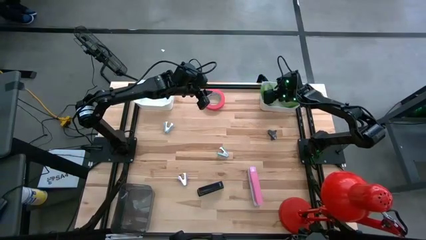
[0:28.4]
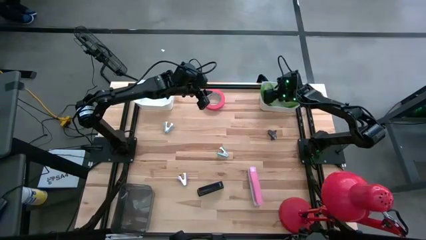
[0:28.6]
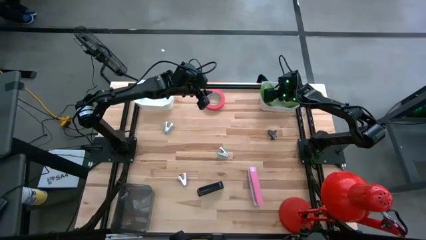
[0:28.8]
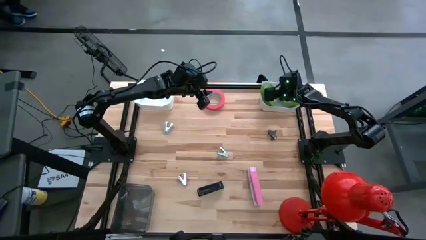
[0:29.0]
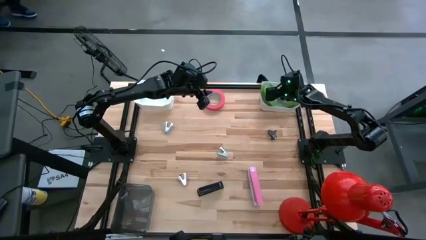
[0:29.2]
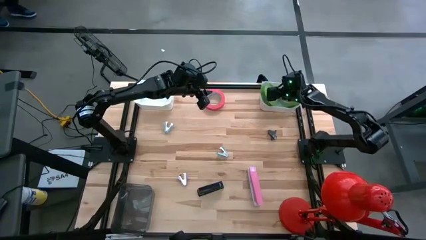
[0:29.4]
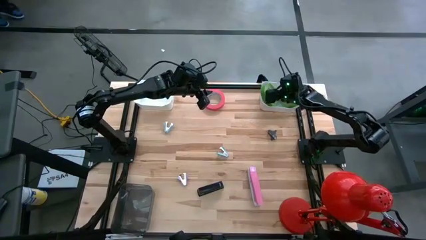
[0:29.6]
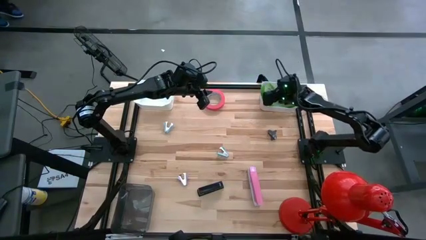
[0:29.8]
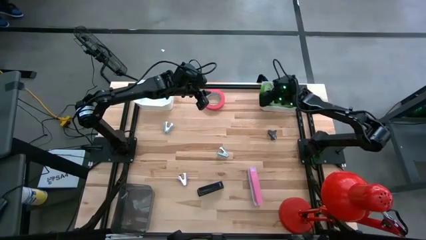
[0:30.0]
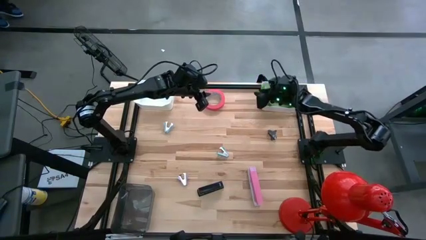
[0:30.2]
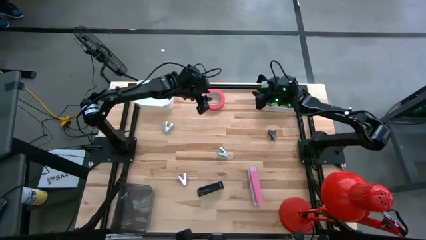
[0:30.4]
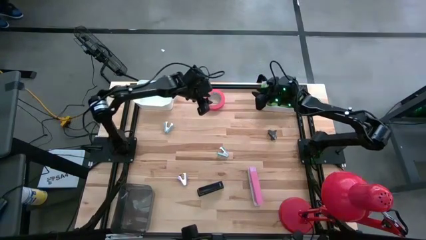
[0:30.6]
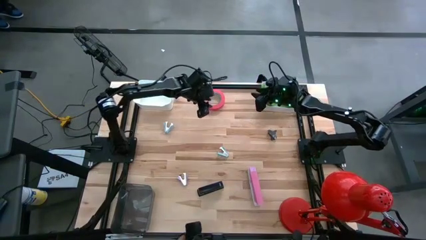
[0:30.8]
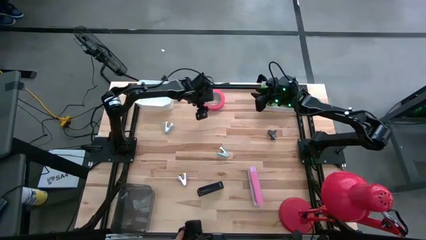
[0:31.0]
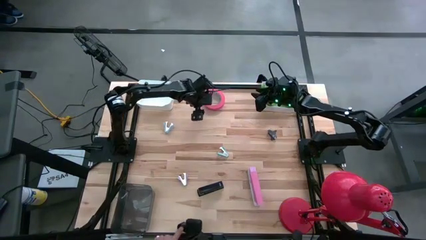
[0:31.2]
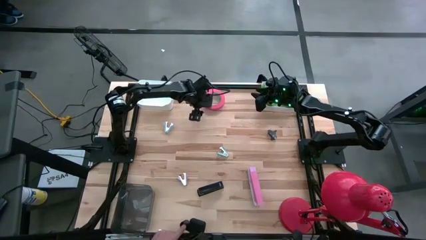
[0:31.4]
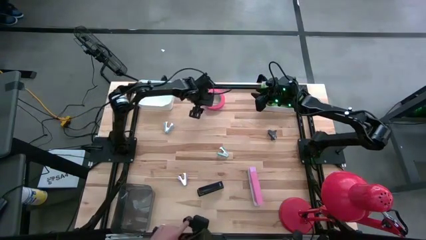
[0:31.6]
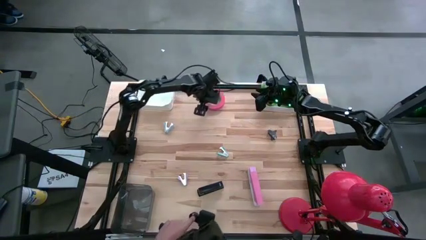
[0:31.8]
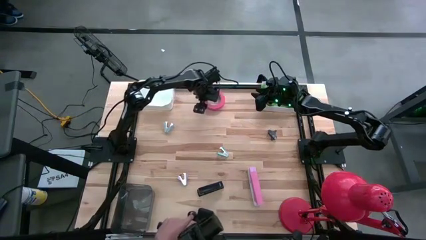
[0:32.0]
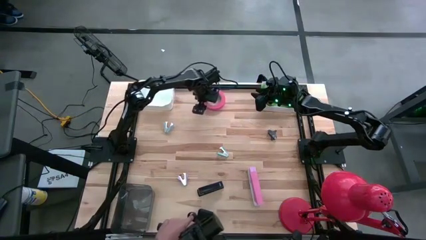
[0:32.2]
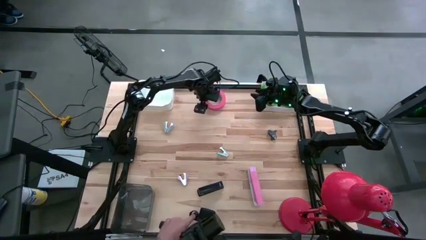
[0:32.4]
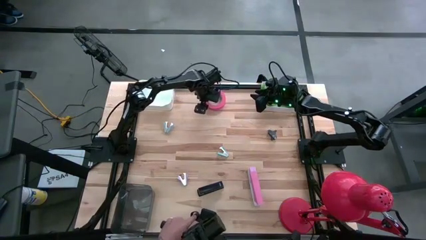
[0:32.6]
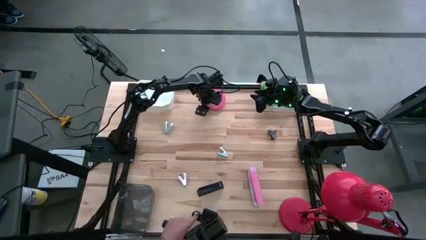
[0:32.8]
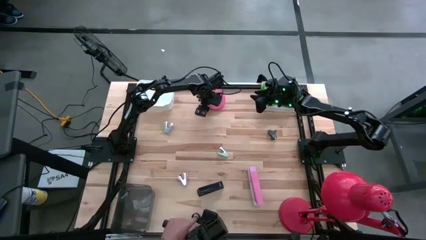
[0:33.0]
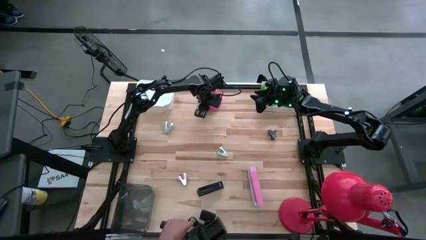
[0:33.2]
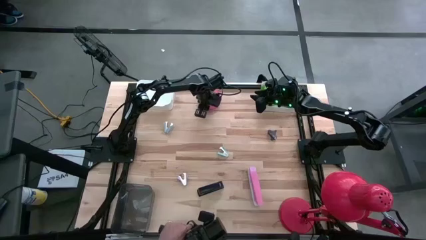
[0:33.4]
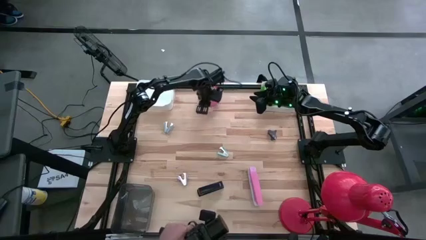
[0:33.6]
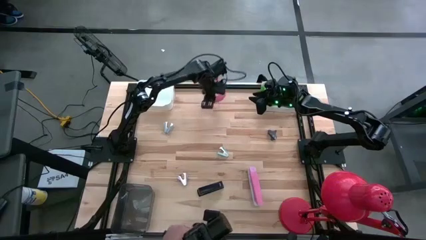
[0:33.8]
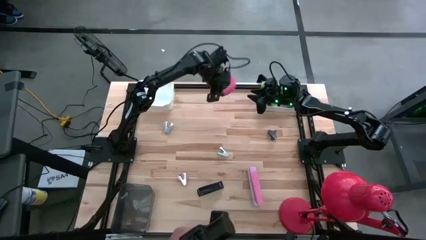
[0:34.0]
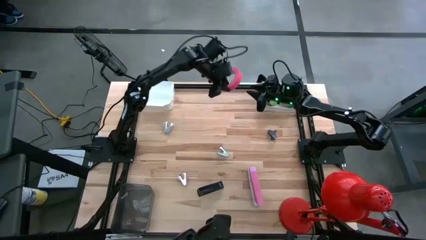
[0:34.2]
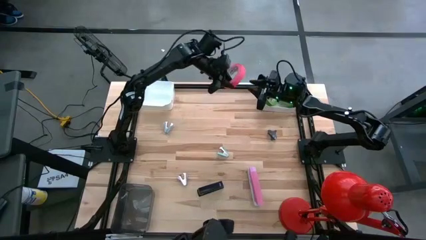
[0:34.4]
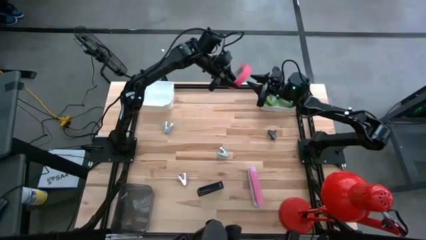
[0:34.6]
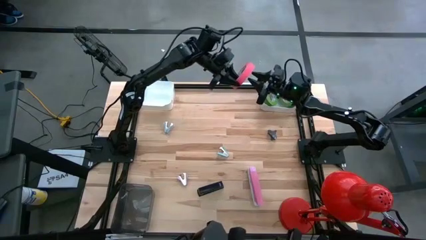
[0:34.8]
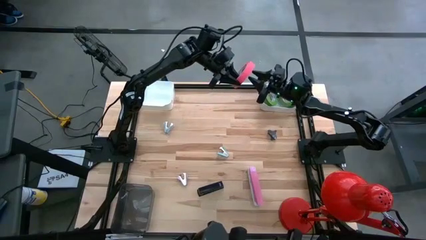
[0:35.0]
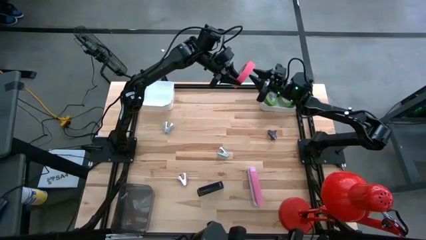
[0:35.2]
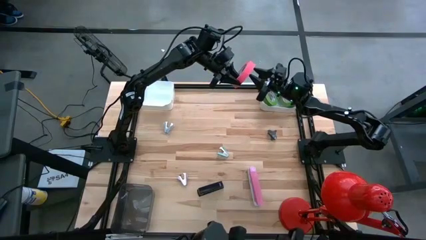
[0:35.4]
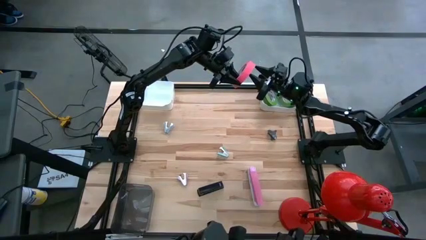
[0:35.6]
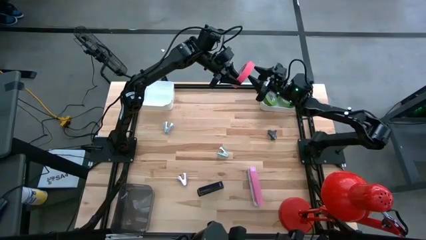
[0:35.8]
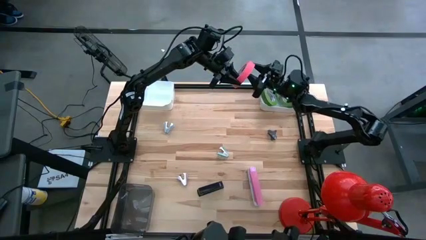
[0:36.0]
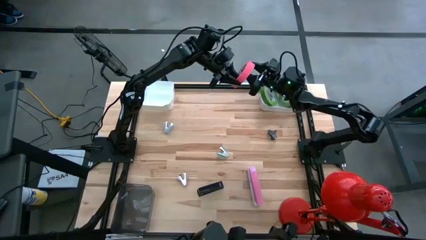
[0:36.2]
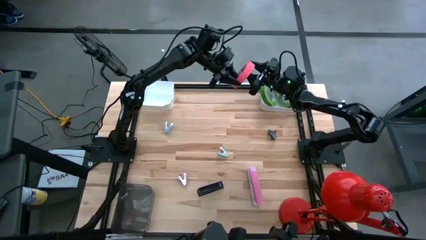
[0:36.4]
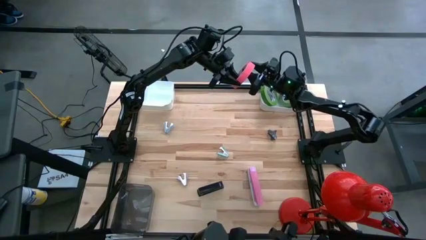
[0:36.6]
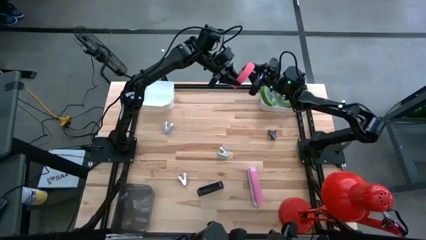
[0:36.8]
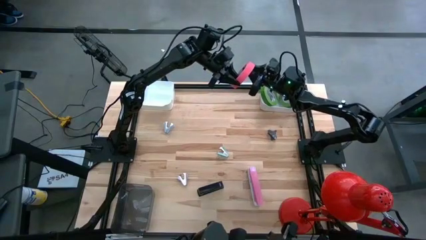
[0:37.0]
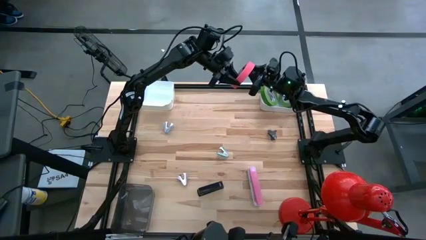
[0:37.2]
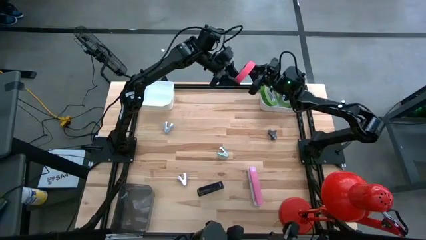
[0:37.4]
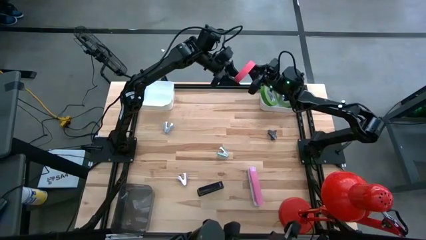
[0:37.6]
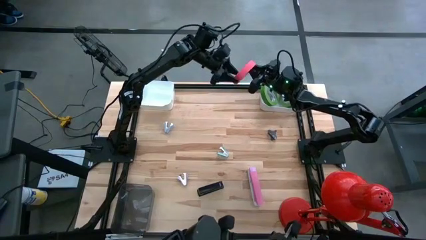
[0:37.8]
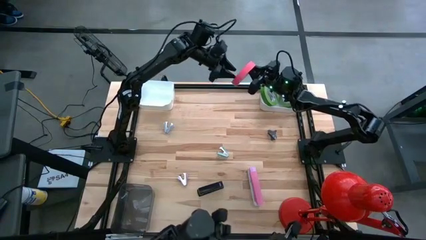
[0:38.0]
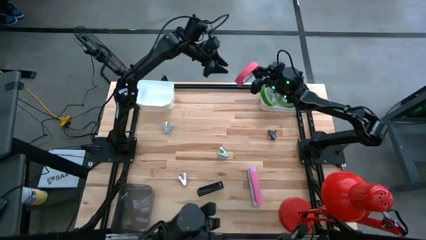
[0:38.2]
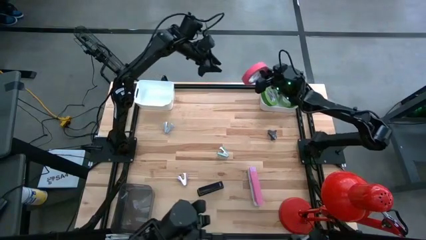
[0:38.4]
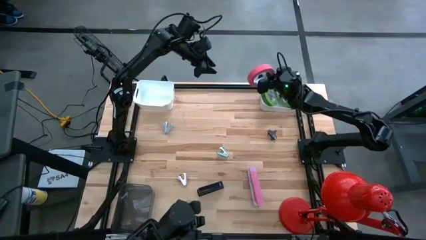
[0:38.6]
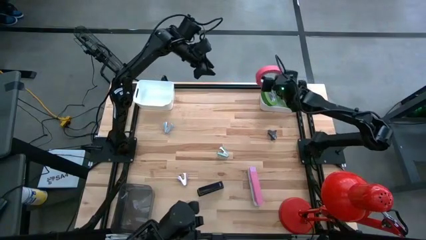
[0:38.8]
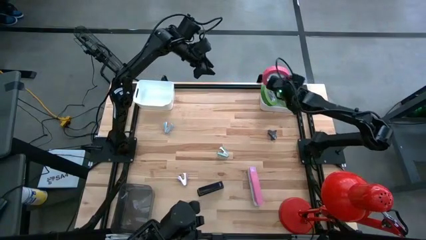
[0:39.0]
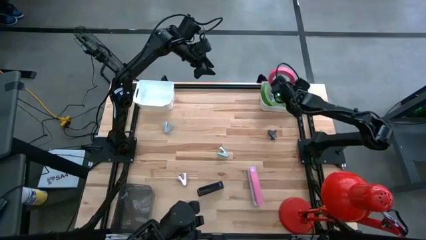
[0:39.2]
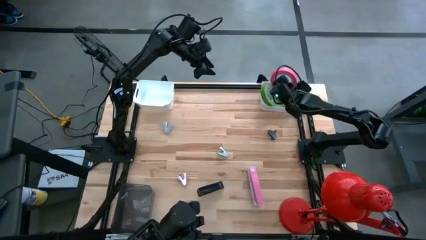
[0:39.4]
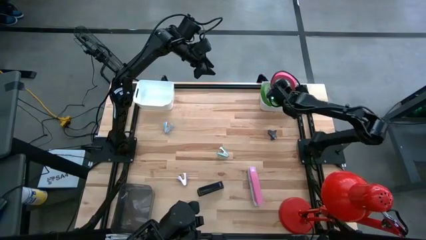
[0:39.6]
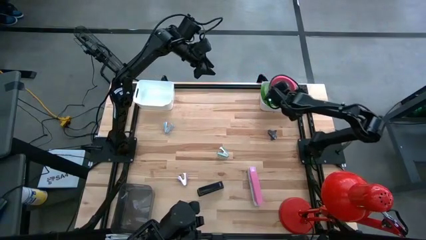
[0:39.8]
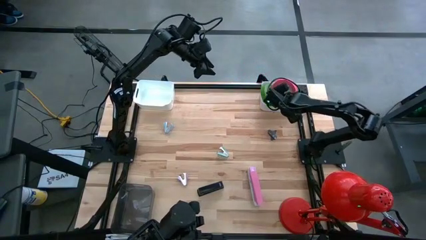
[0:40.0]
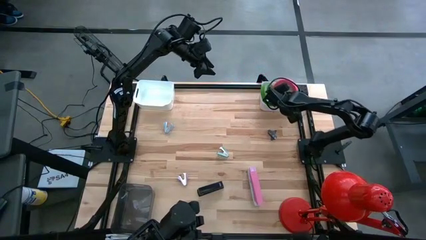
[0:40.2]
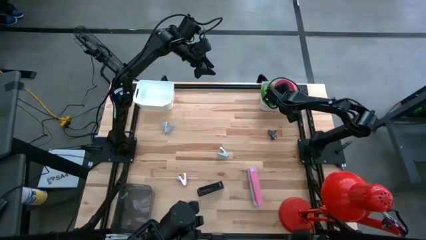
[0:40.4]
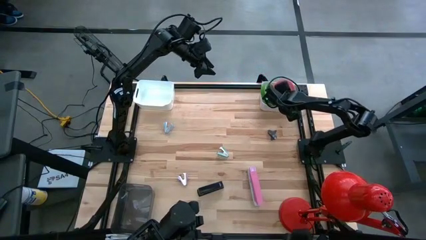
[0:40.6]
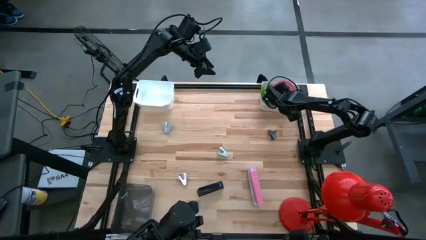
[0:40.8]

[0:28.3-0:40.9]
Task: Pick and place Stapler, Stapler remover, tape
Put the pink tape into the right white bin
